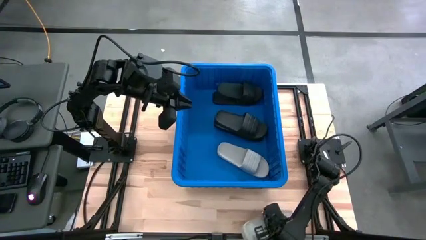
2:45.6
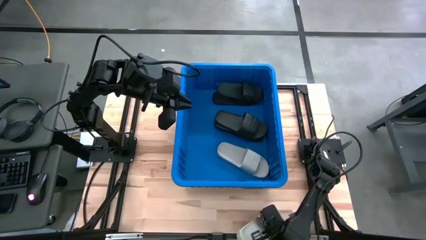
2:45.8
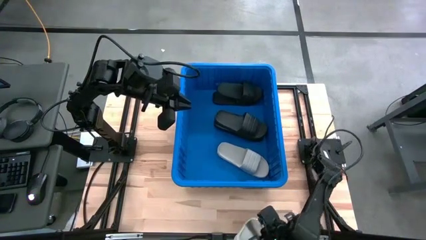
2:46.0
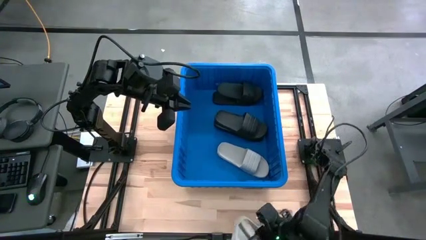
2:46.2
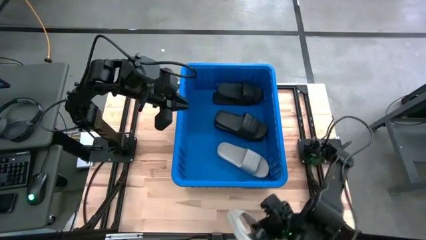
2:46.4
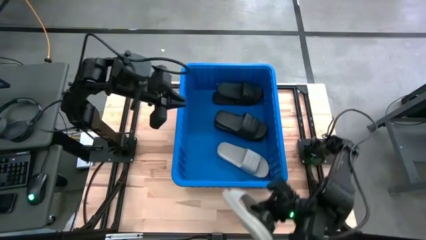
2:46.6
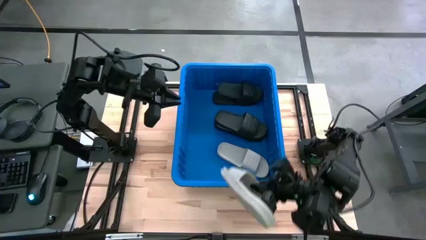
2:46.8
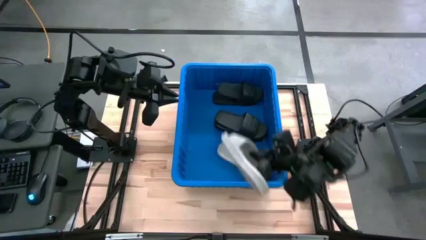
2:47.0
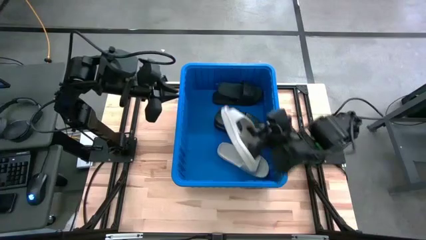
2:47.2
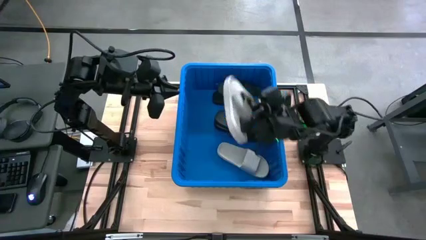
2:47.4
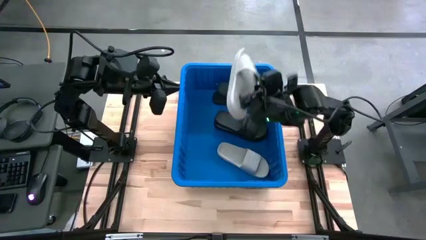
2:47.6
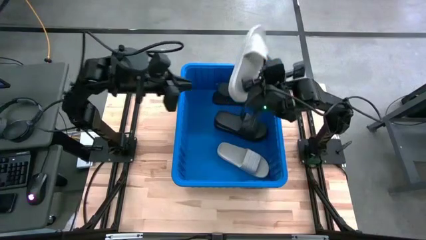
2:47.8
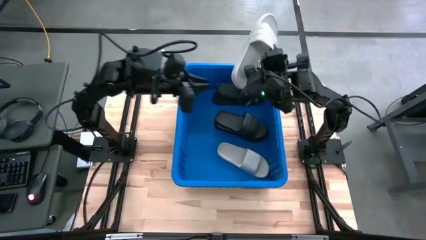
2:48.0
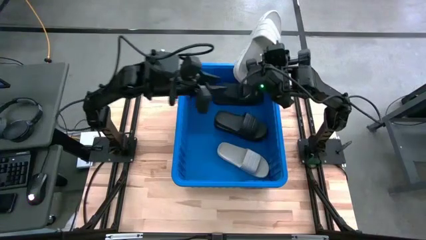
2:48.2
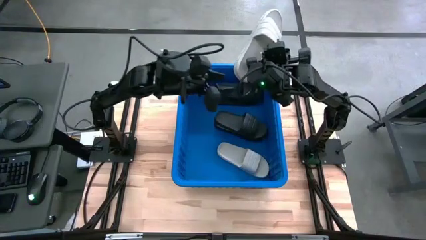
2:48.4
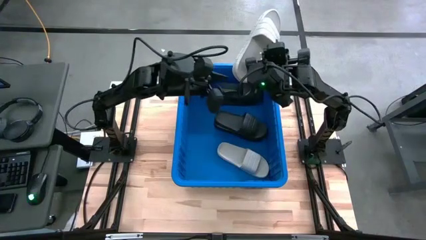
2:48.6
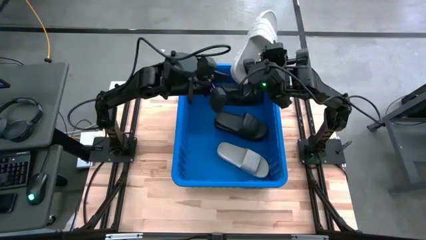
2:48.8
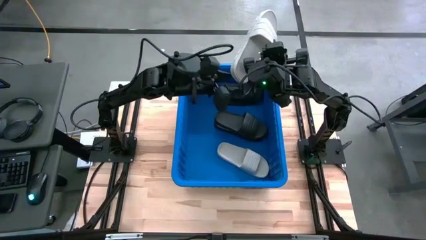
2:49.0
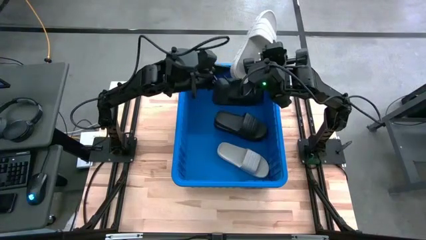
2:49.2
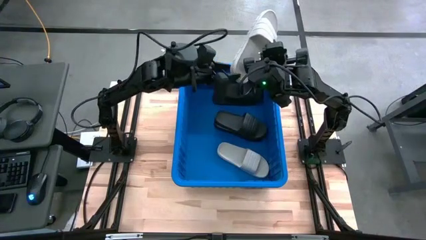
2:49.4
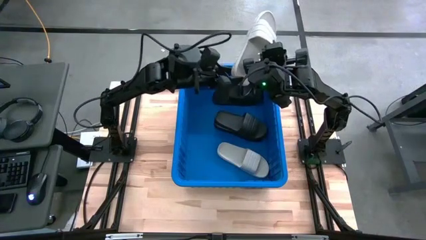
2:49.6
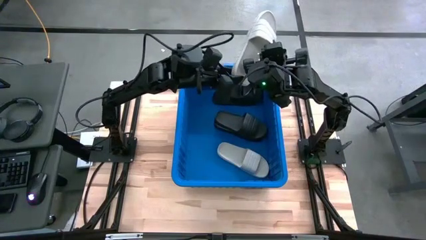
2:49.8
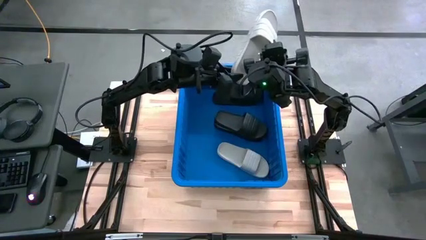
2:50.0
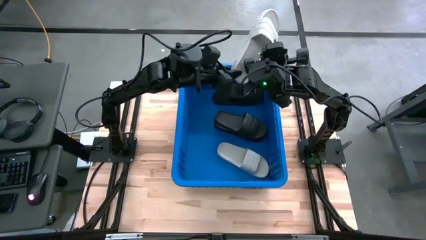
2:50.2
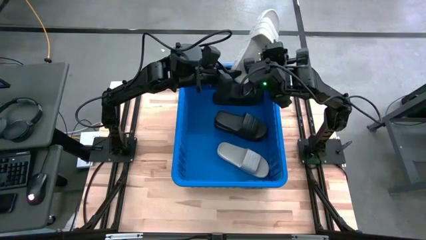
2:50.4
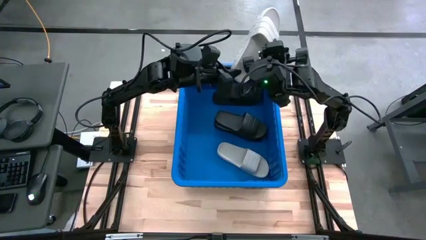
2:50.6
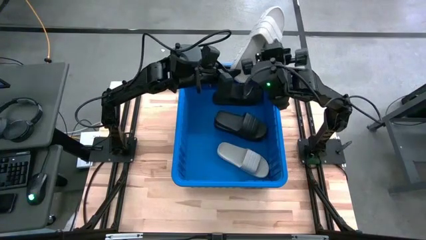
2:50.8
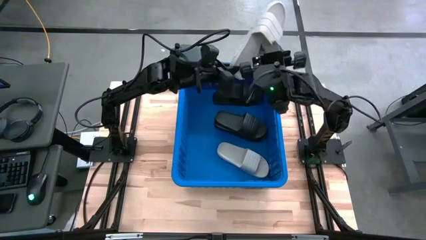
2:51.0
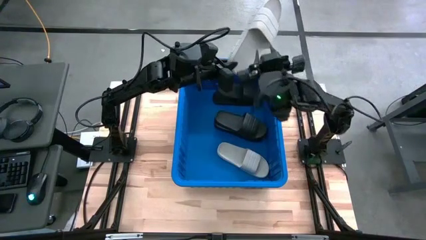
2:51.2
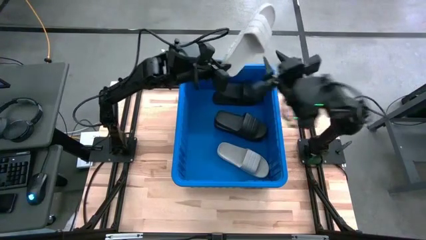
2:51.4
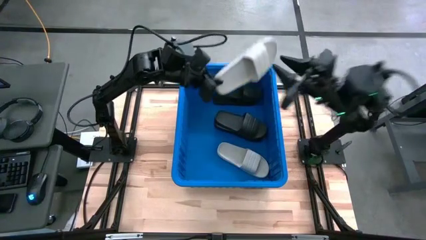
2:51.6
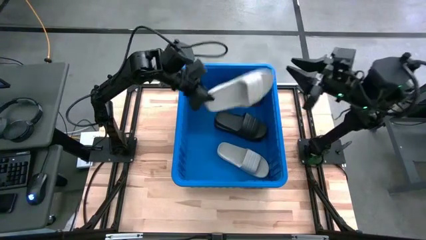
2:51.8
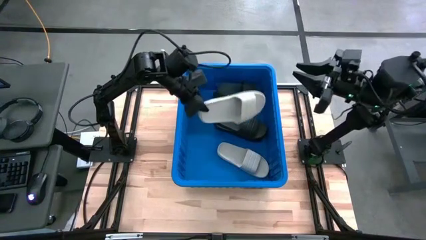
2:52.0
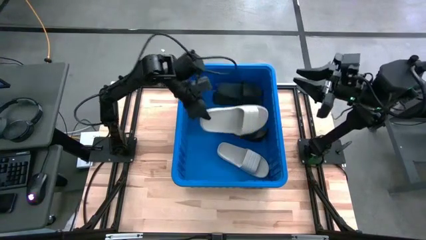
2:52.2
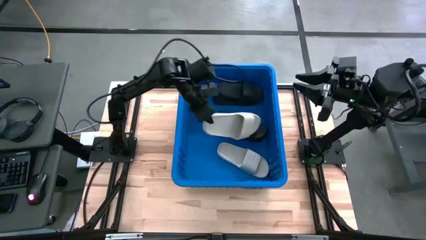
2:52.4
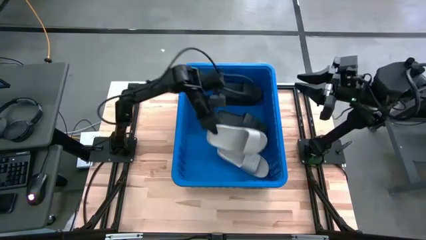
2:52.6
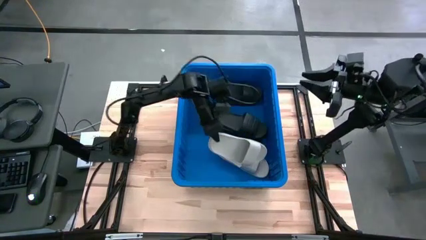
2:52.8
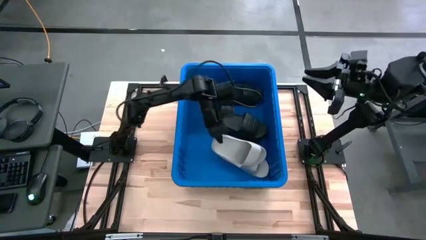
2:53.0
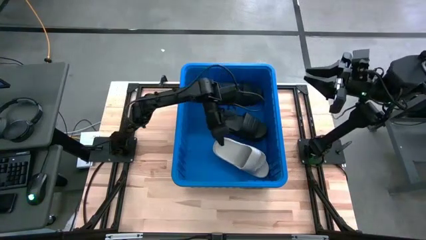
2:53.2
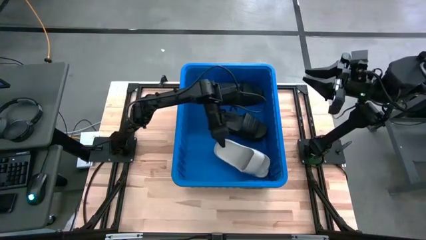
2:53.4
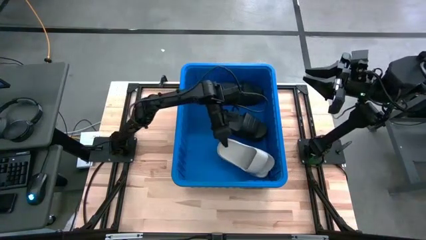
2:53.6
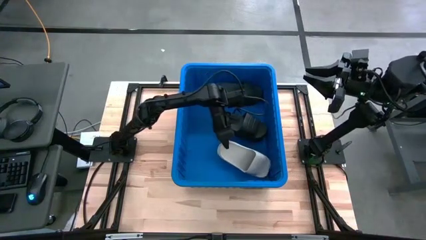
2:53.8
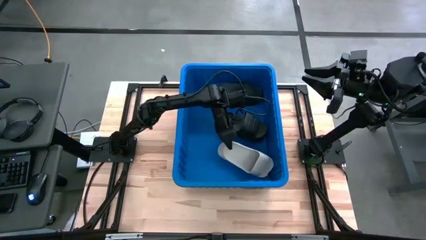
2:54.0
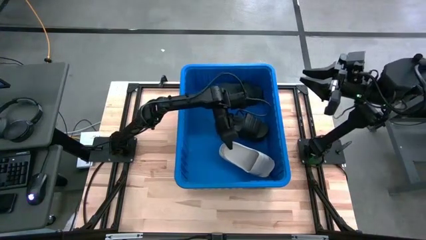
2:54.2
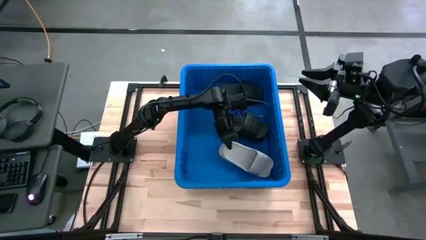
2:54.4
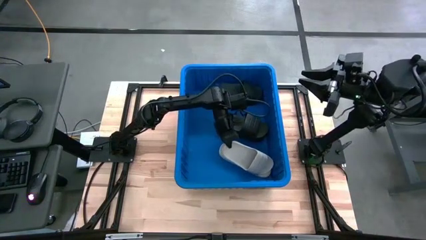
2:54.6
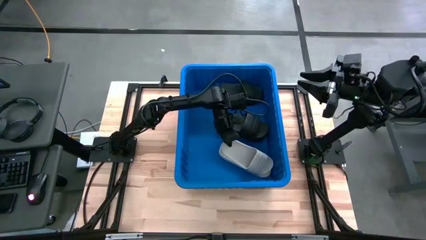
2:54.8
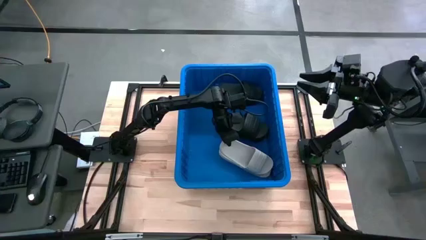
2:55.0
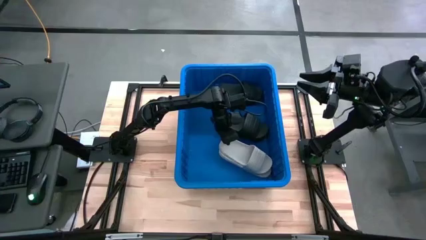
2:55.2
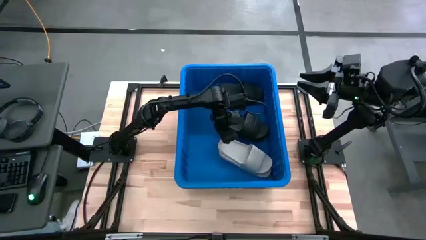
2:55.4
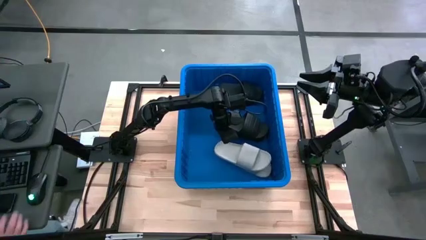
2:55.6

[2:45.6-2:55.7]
Task: Pick and place slides into bin
Stack the gray slipper on the gray slipper in the blue bin

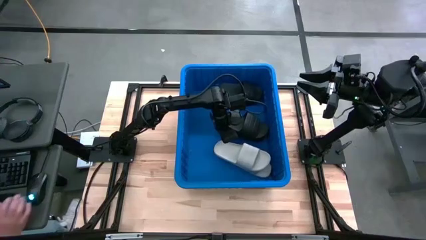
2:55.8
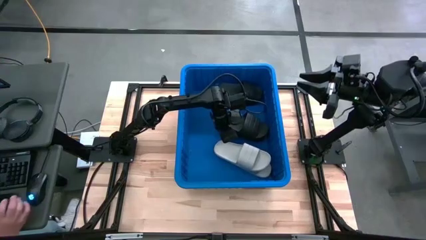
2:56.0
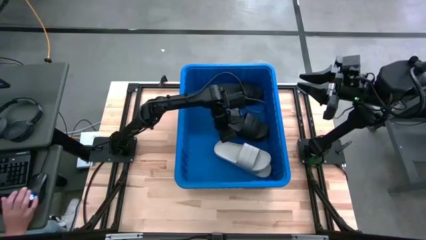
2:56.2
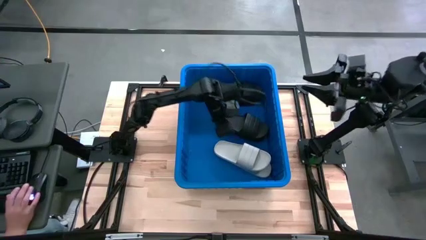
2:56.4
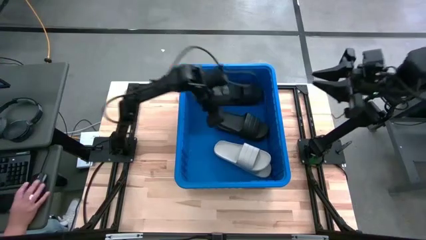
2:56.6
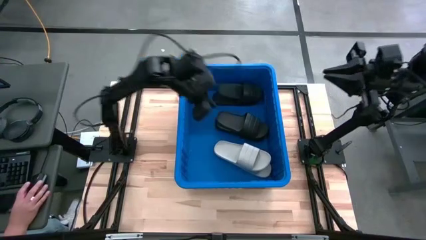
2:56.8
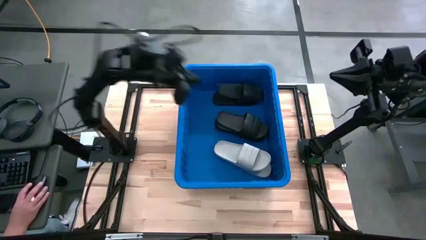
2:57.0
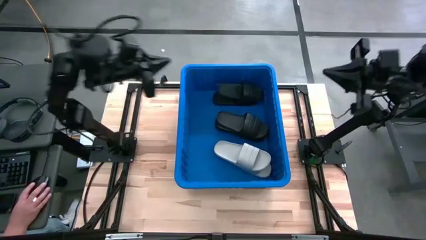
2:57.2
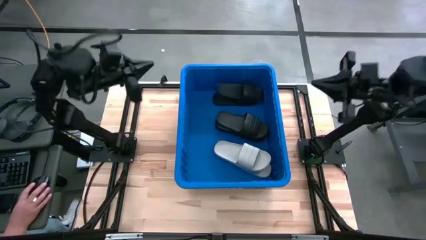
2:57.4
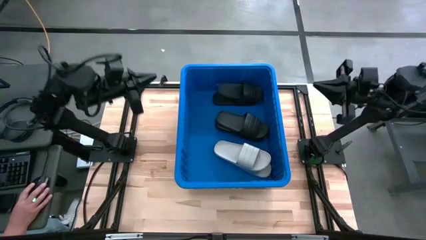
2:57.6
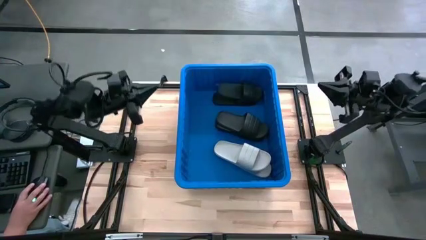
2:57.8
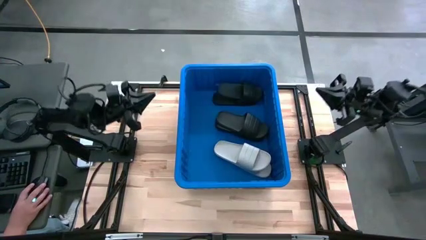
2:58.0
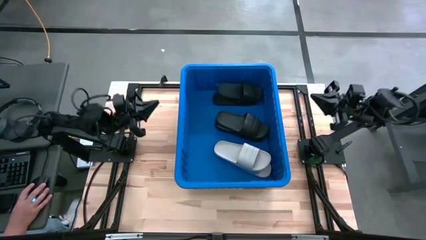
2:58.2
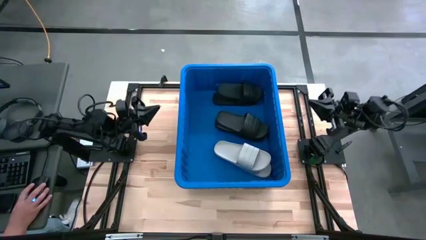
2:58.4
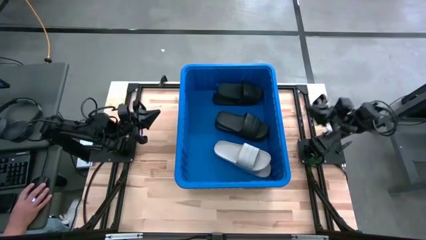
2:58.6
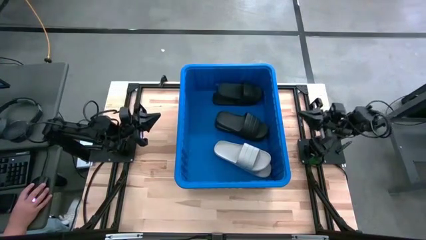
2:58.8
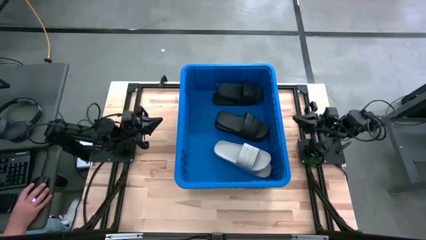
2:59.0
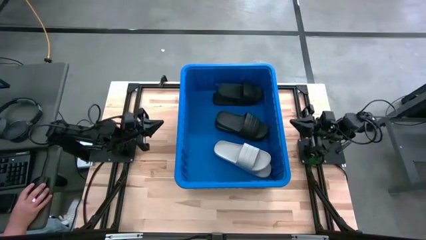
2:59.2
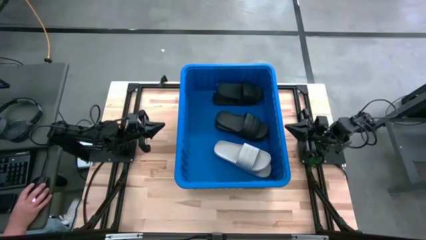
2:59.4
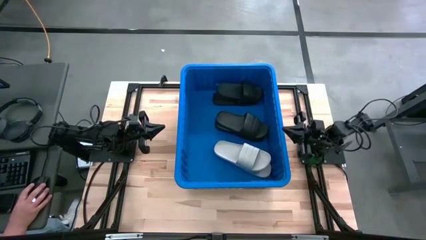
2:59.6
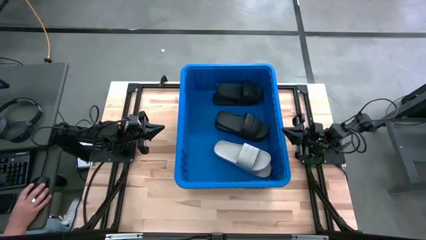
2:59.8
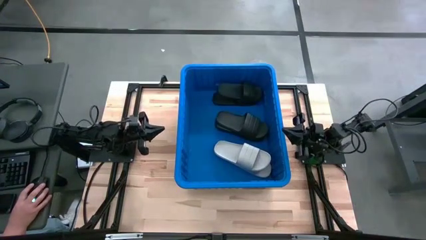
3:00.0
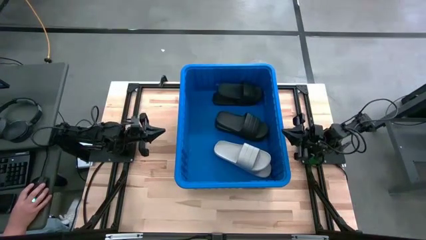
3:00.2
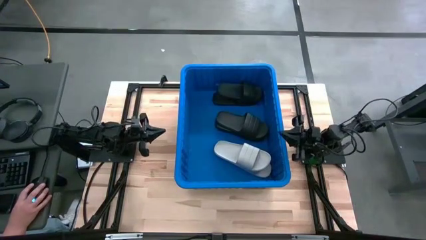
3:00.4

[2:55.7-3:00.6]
Return to Home Position

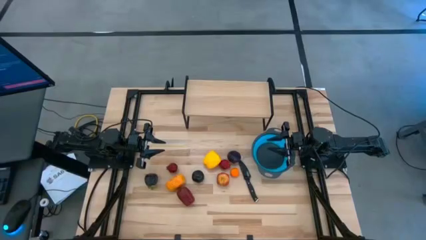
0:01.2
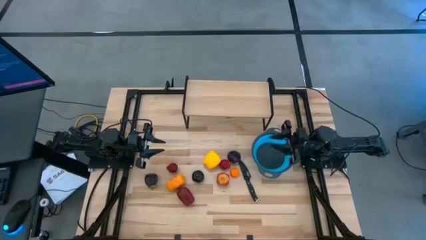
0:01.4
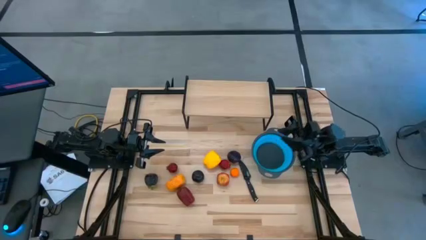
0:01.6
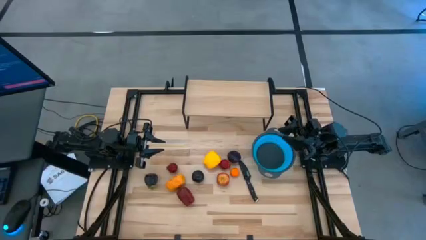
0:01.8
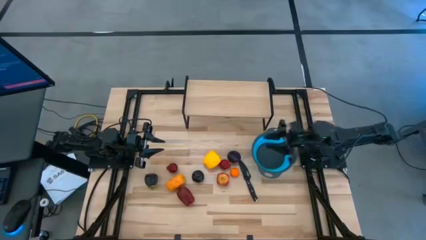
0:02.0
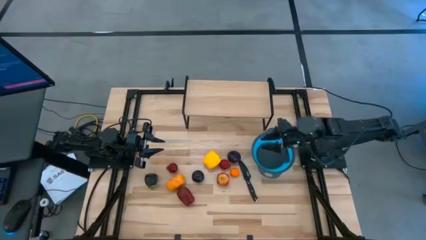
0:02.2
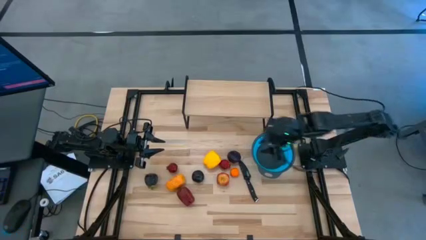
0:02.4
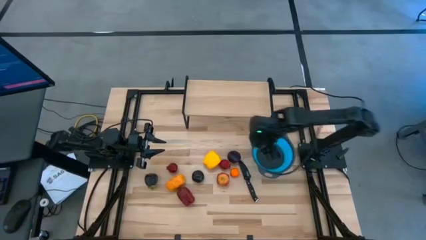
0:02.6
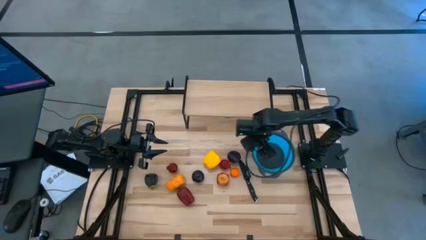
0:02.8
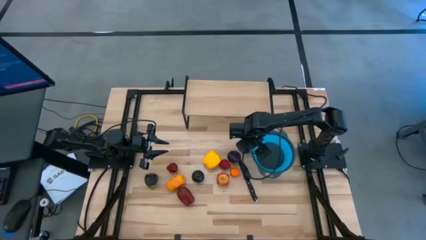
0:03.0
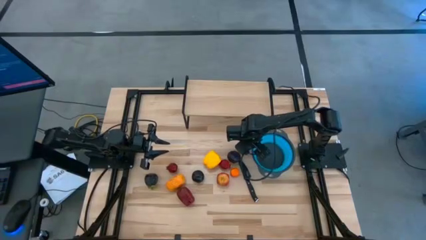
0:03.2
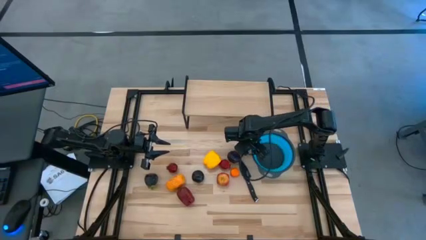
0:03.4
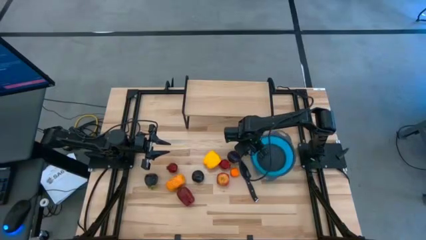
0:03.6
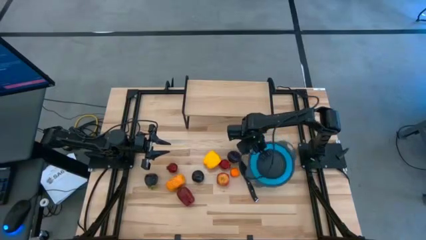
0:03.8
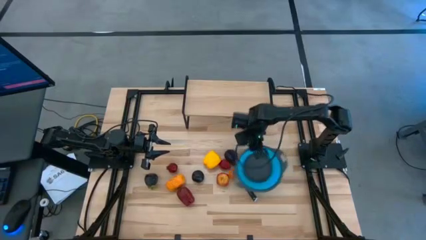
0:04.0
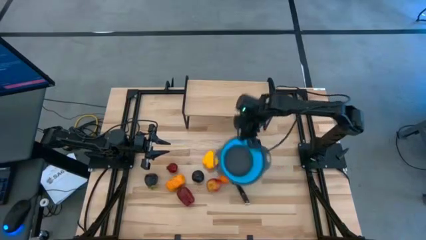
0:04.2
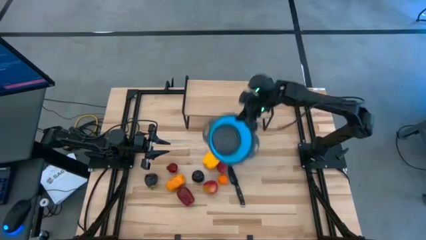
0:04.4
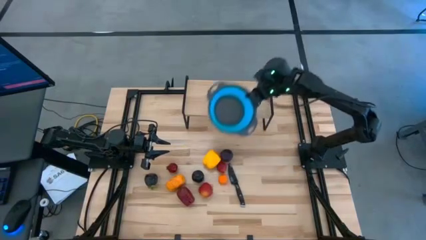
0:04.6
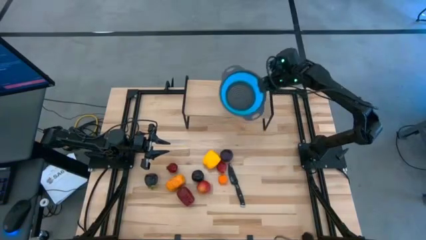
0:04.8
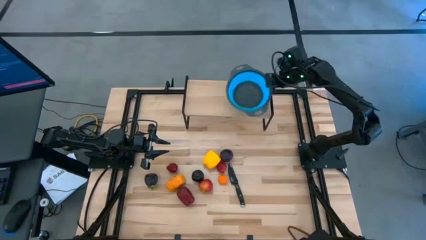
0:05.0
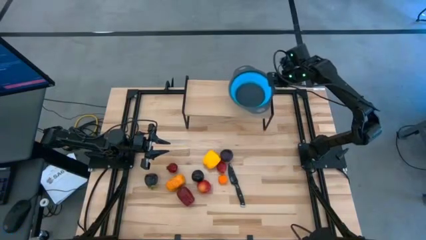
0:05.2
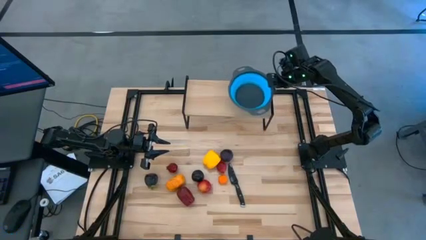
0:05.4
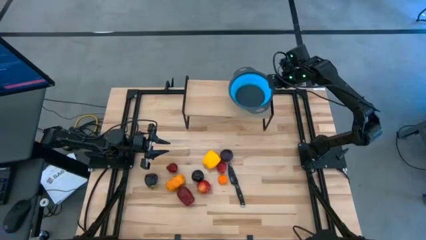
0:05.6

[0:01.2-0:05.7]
Task: Pick & Place Fruit
Put the blue strainer bowl on the shelf
